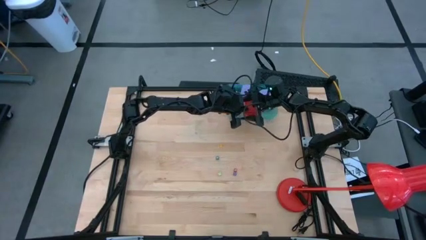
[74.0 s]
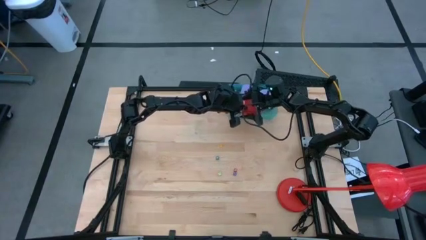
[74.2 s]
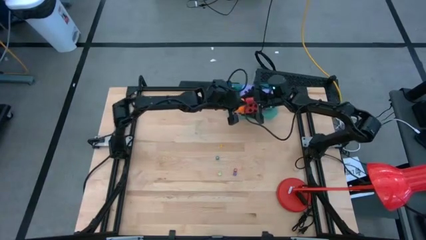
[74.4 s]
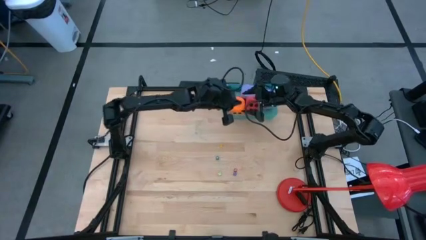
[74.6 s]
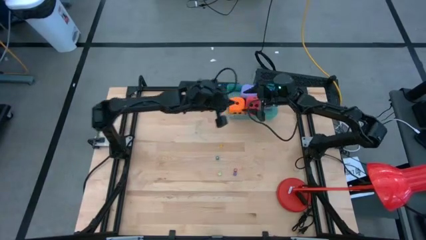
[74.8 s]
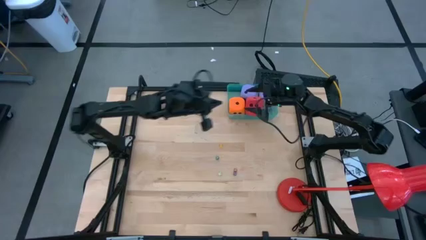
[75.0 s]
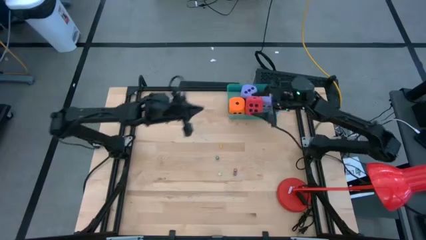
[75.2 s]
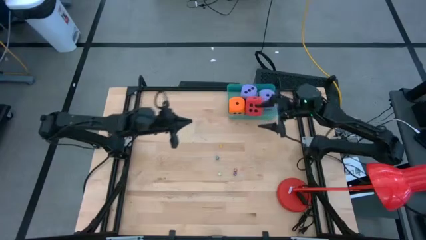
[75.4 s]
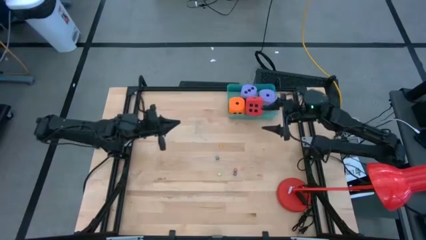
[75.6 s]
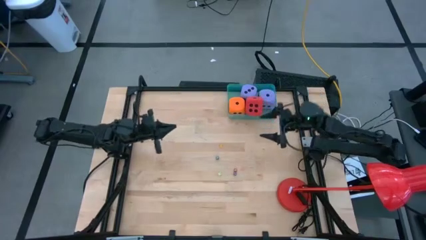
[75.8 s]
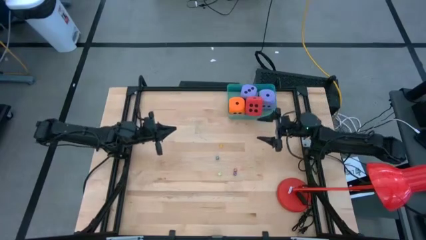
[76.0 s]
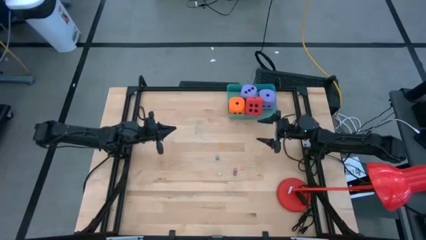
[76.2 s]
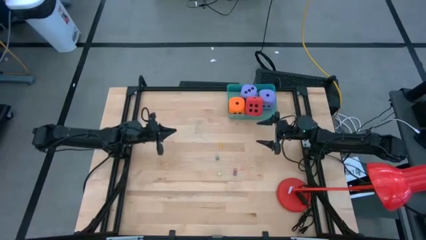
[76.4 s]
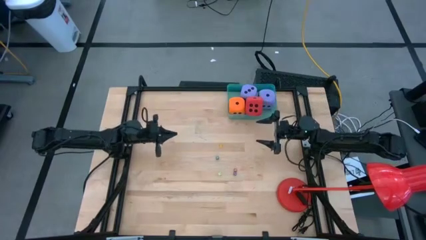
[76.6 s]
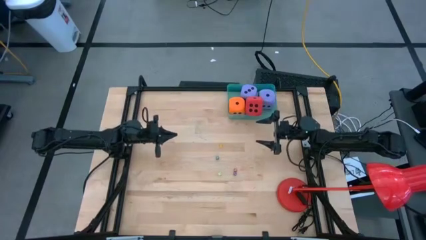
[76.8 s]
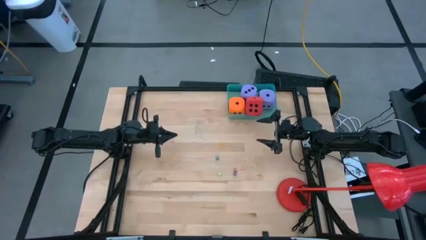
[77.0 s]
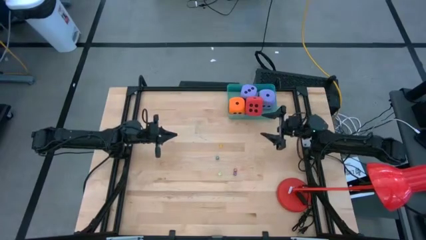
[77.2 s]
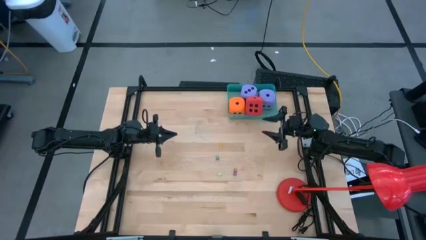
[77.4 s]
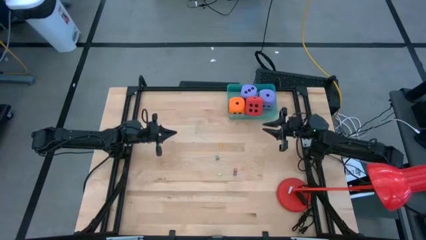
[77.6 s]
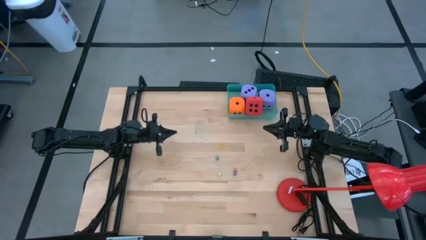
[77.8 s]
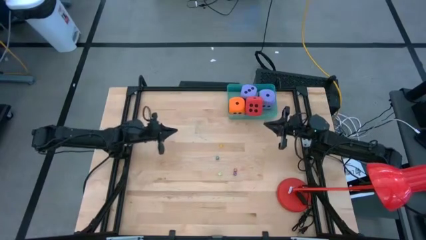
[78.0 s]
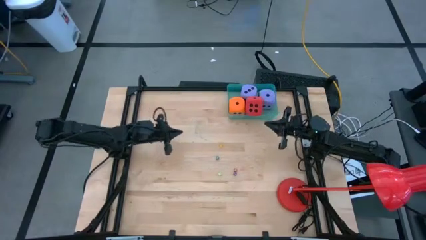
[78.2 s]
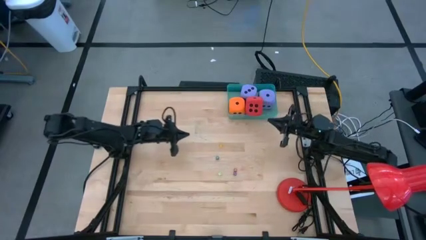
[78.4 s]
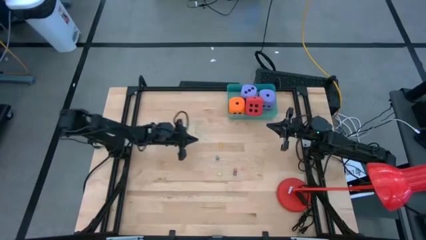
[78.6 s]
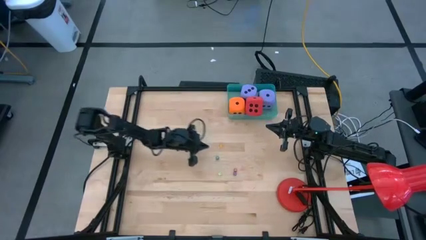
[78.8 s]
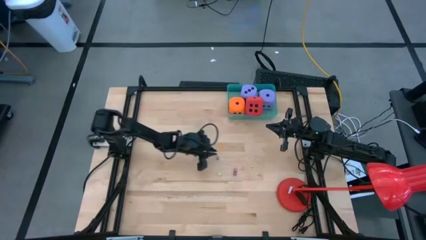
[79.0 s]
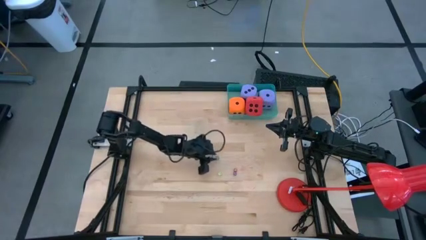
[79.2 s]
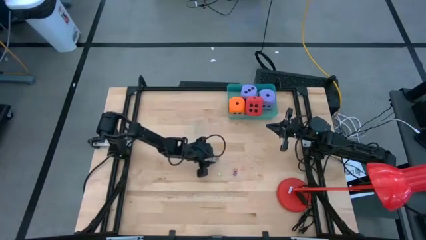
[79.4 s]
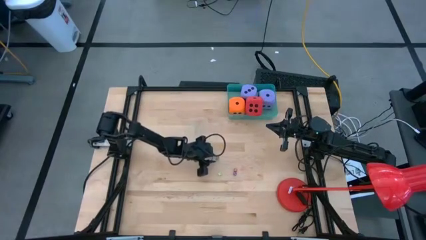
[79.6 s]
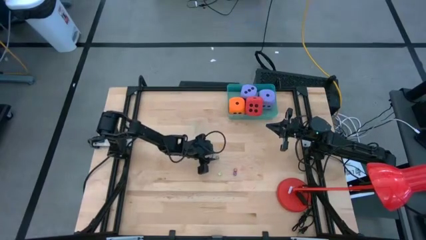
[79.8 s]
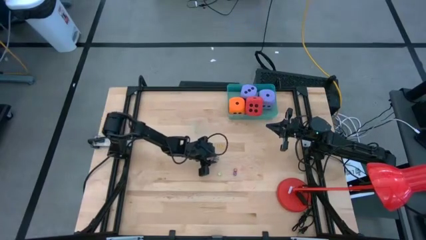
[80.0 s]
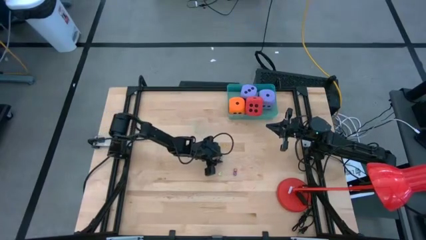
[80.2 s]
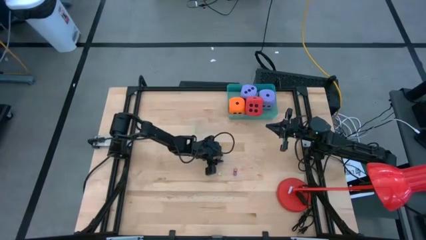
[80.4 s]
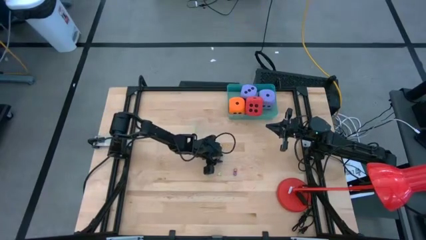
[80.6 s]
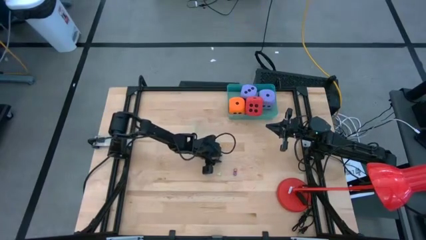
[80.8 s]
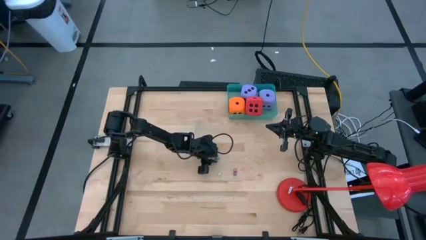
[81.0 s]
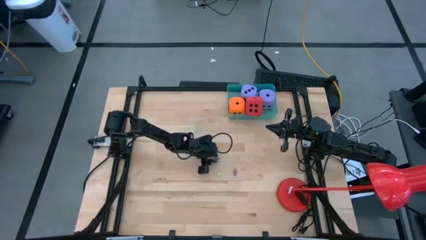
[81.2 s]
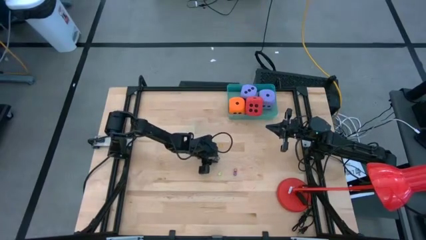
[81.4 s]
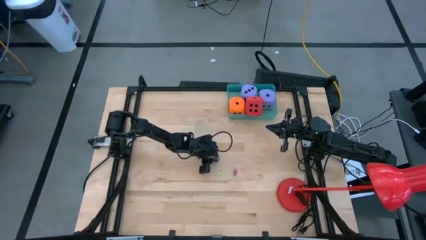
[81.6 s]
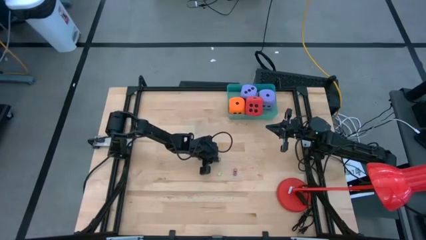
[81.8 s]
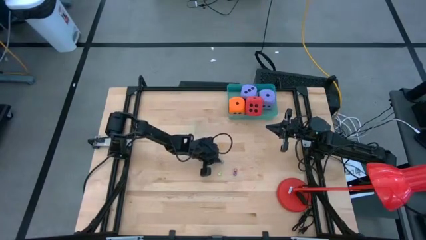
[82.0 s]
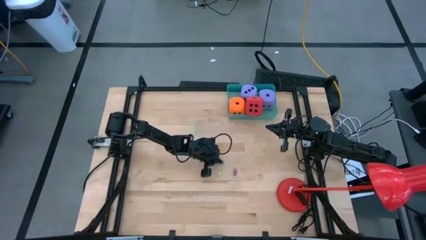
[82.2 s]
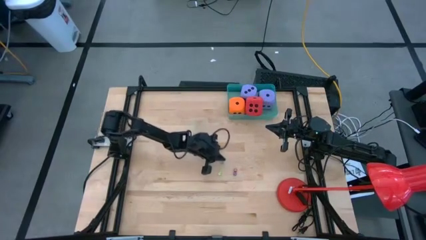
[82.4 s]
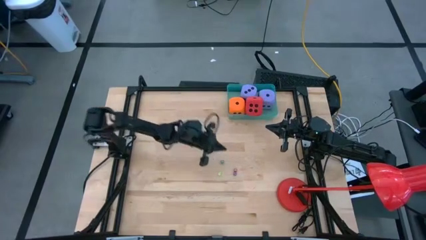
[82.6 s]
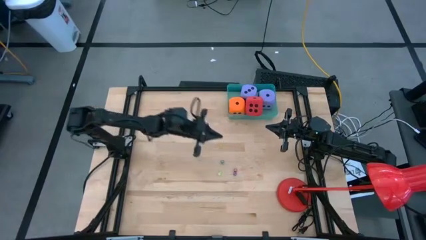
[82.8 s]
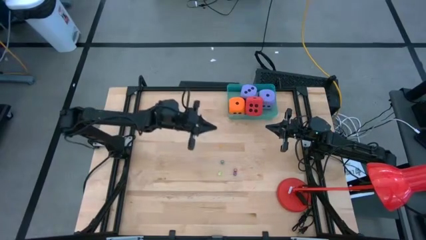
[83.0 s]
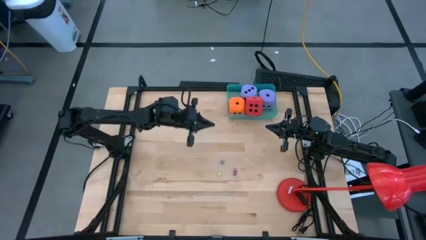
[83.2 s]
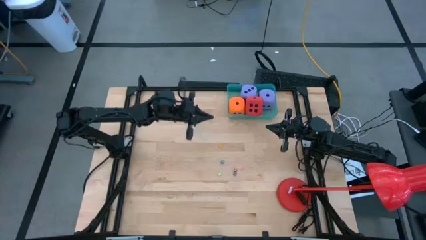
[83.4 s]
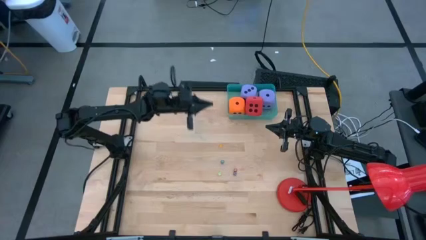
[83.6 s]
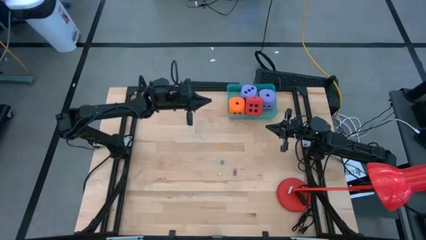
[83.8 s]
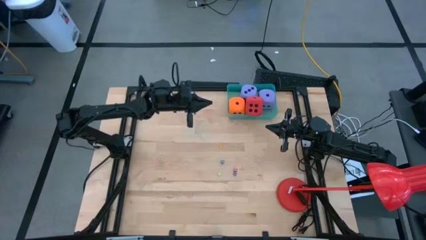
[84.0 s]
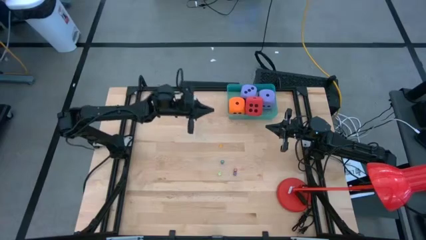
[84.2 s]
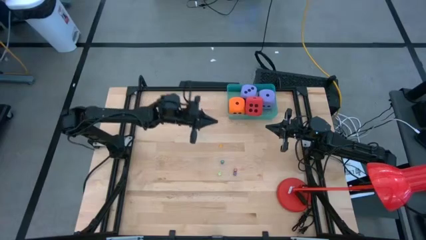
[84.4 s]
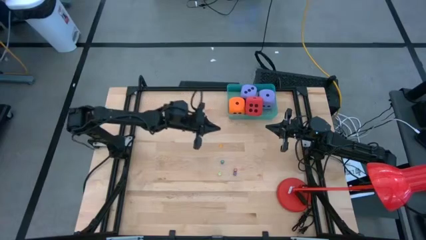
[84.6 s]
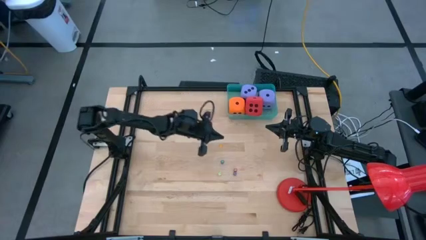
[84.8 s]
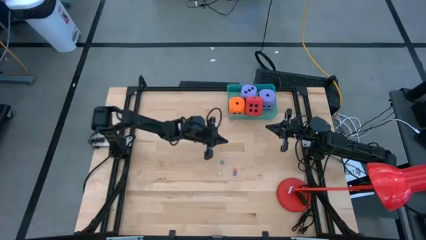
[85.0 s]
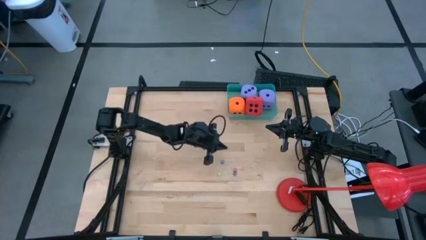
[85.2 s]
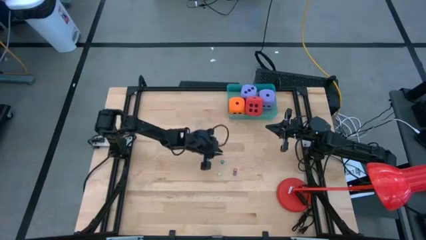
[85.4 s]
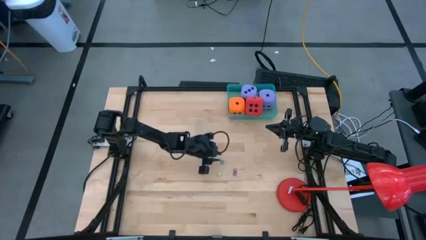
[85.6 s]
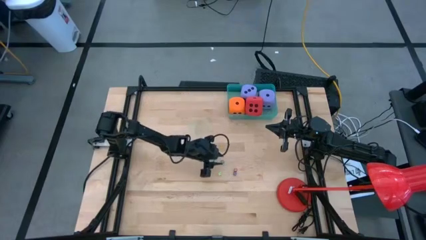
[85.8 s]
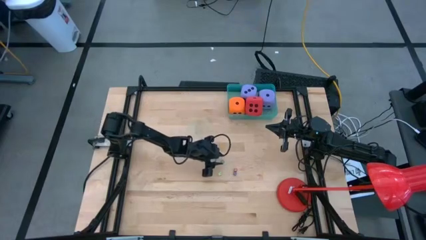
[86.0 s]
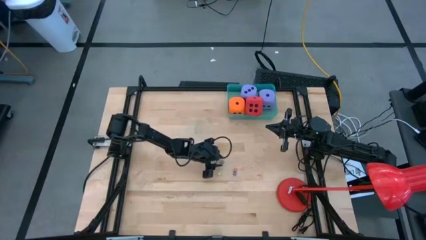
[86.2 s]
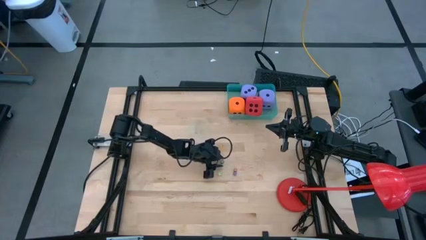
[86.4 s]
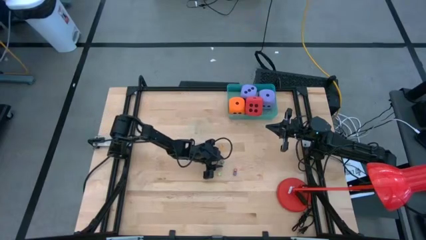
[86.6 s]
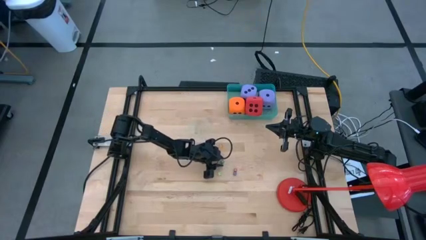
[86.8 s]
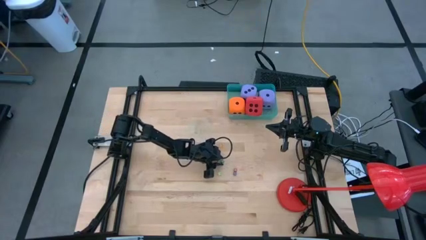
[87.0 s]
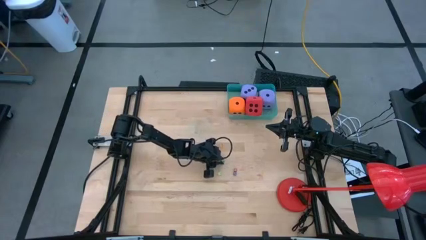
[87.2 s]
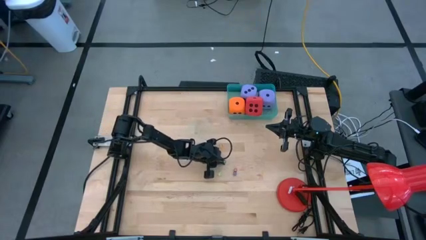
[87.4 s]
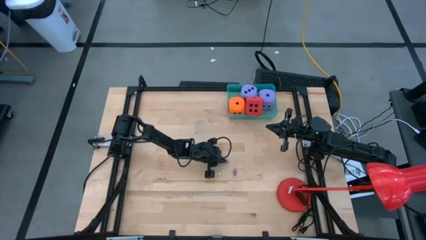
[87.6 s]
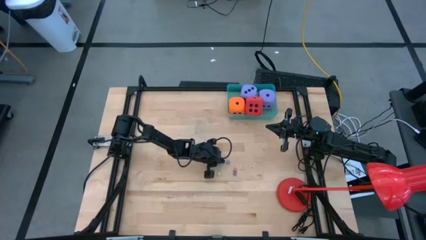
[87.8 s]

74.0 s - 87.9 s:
Task: Pick & Place Dice
Put the small dark green dice into the blue transparent bin

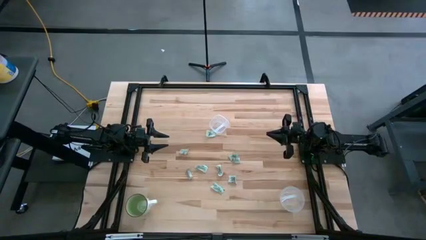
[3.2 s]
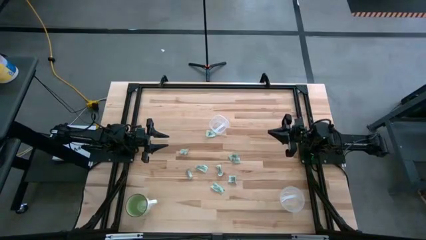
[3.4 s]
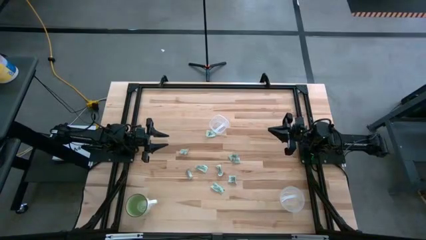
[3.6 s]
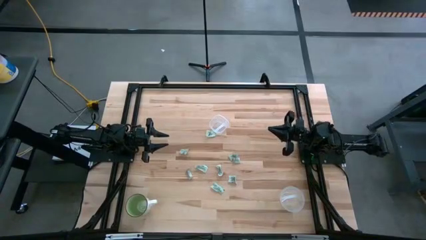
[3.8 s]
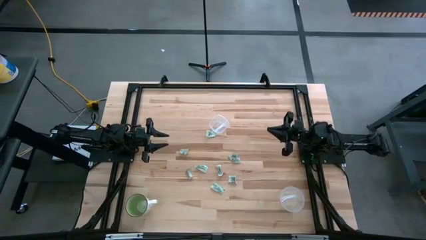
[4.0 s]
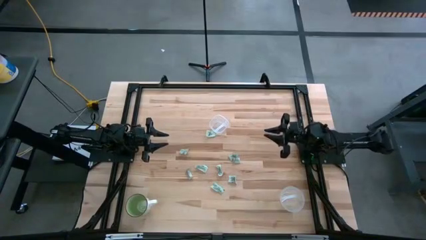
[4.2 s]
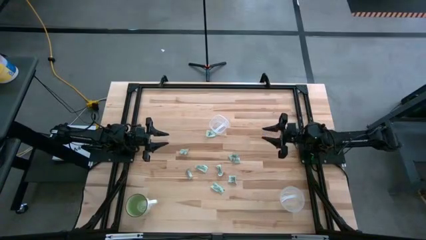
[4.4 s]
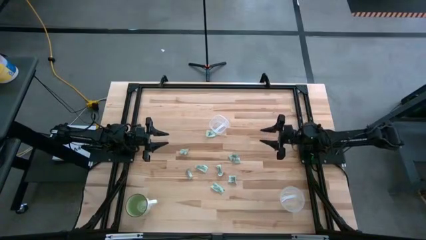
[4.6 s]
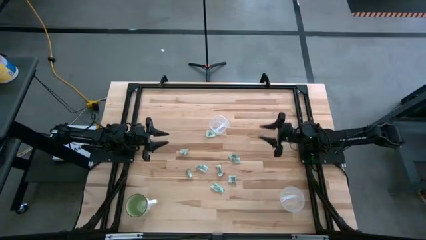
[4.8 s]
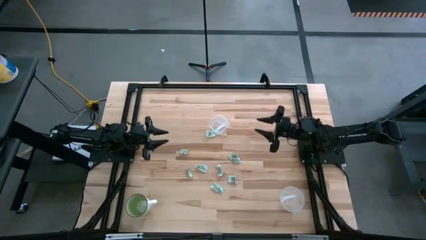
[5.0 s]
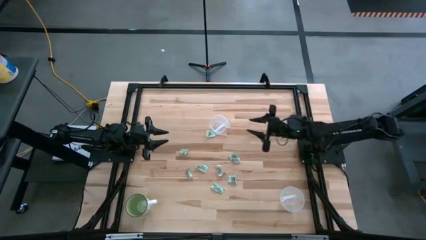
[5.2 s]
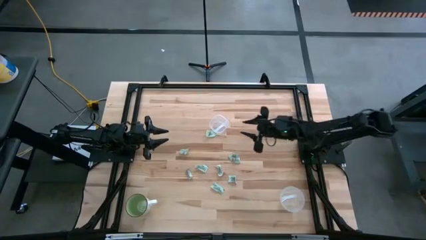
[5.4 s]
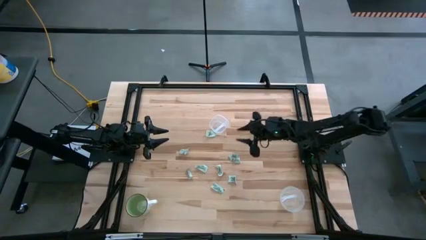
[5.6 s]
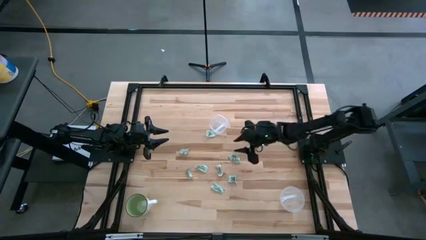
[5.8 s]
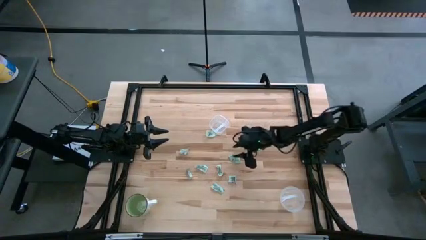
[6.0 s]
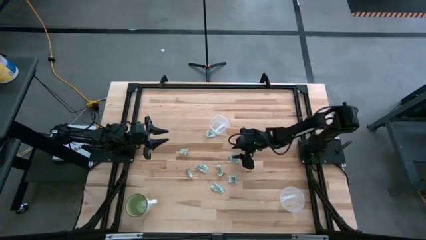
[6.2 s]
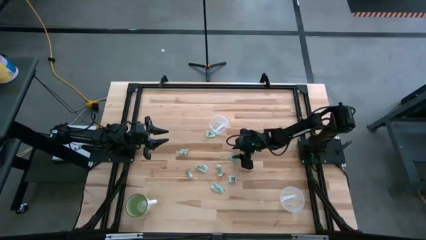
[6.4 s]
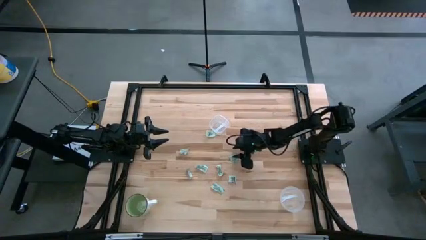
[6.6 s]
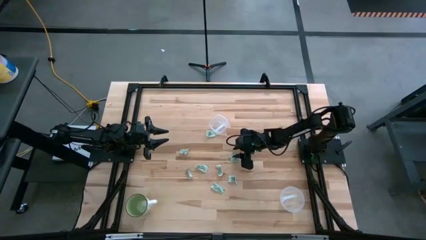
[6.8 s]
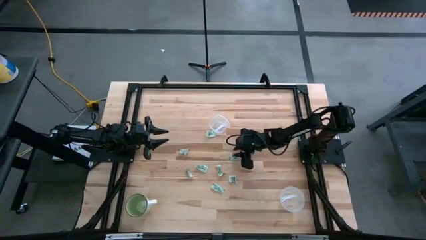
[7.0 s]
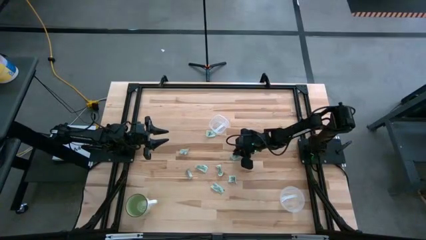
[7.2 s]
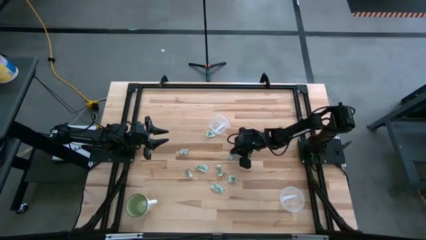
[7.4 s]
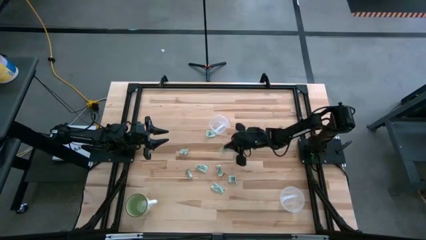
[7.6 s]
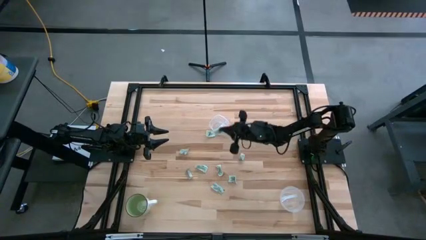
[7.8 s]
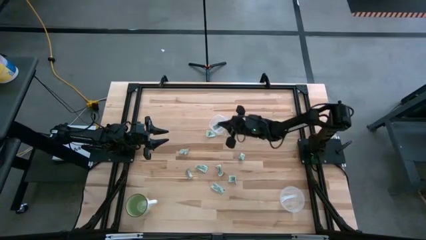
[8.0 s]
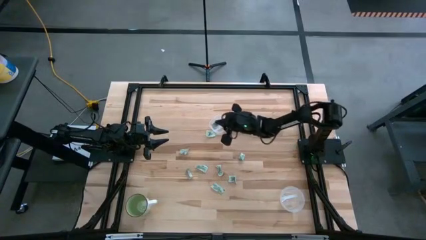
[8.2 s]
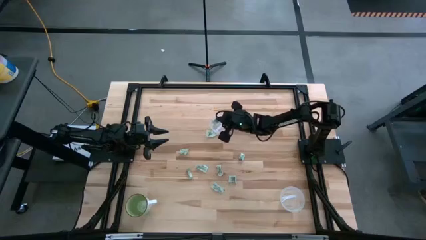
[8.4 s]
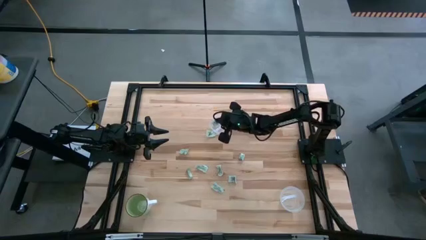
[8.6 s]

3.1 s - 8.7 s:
Task: Pick and place items into bin
Put the green stevia packet into the square transparent bin
